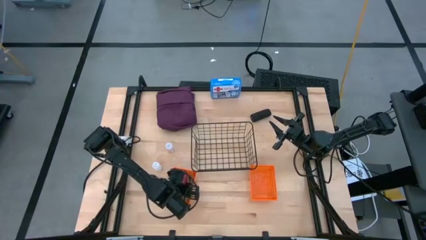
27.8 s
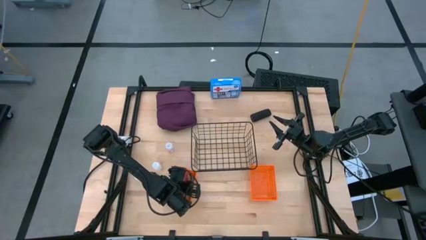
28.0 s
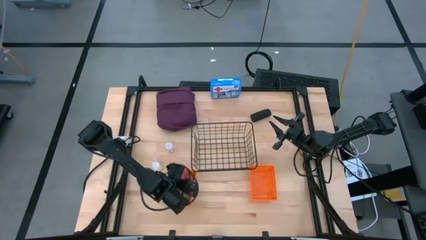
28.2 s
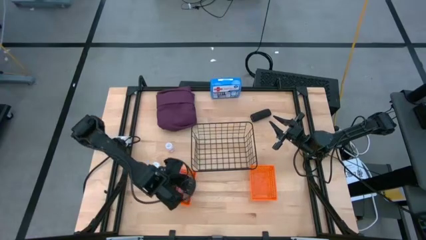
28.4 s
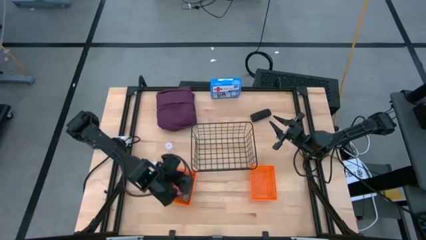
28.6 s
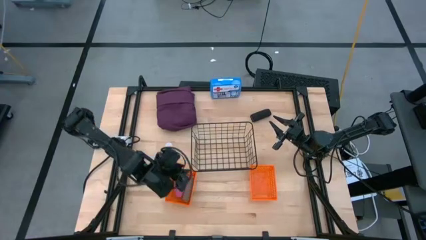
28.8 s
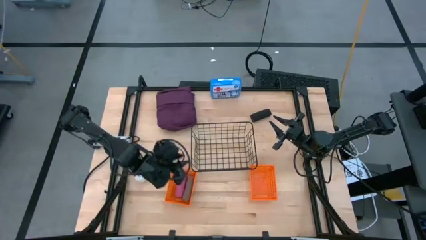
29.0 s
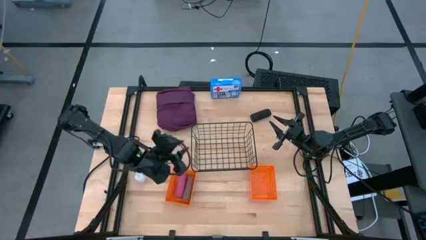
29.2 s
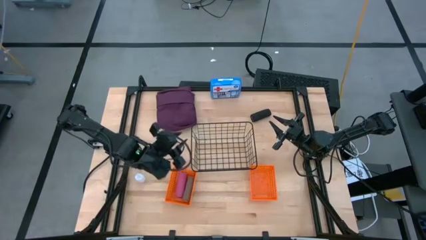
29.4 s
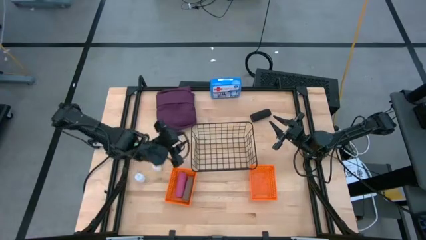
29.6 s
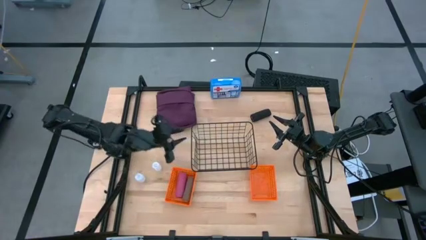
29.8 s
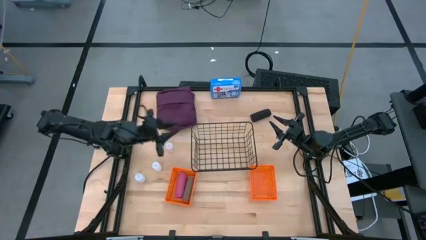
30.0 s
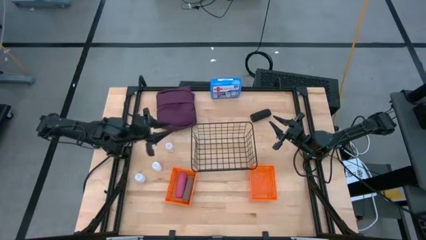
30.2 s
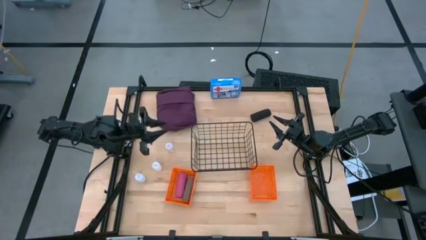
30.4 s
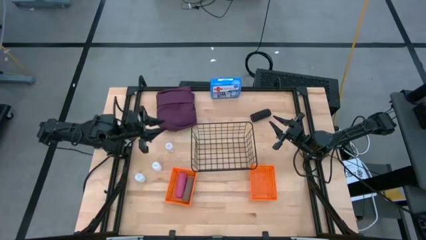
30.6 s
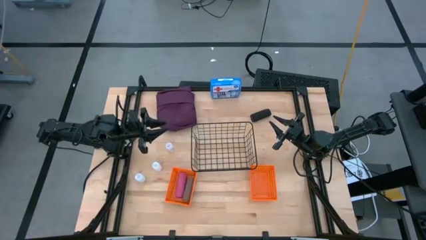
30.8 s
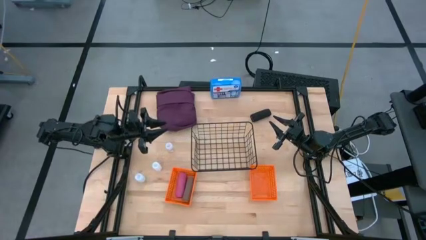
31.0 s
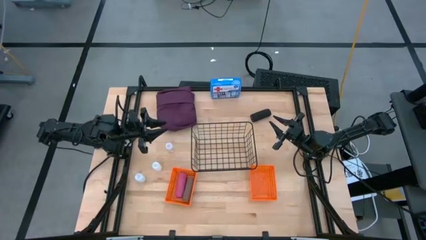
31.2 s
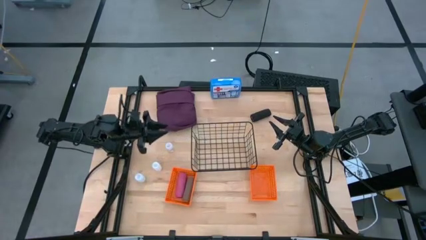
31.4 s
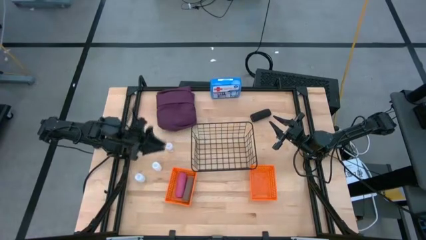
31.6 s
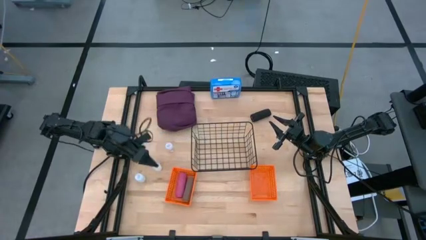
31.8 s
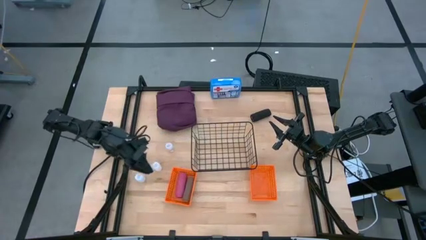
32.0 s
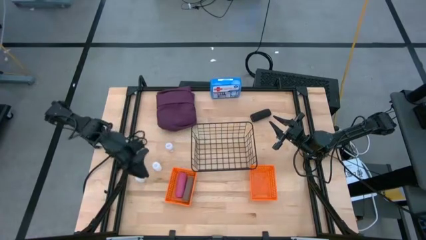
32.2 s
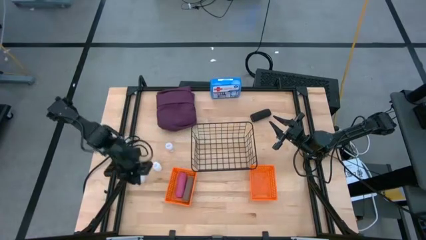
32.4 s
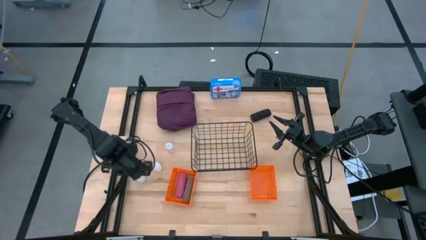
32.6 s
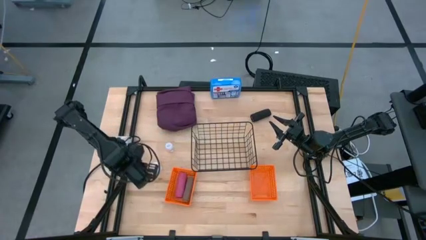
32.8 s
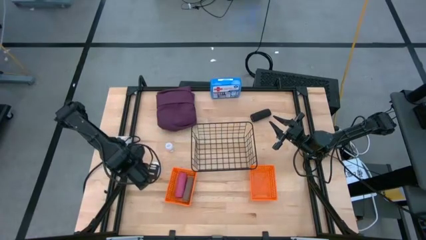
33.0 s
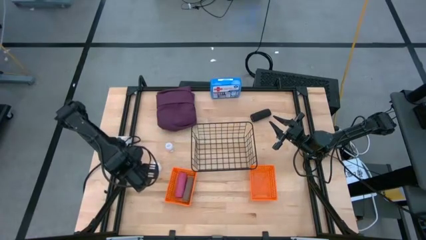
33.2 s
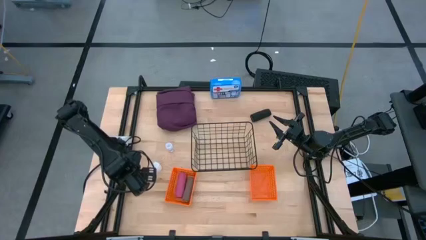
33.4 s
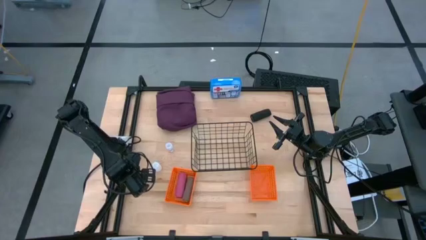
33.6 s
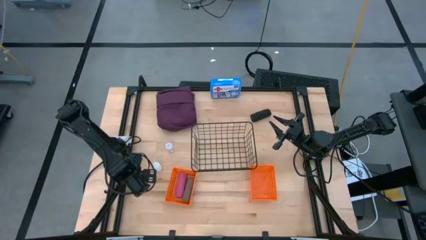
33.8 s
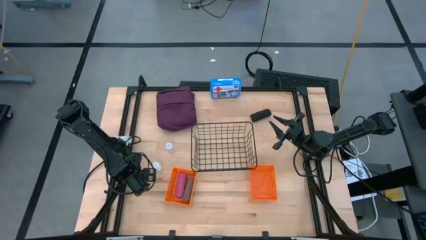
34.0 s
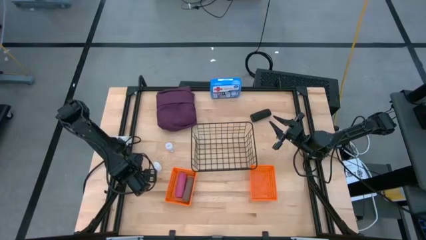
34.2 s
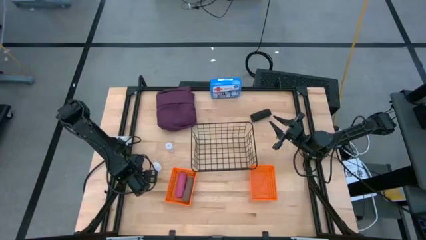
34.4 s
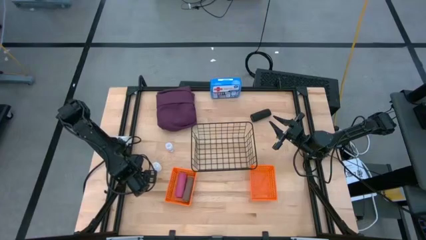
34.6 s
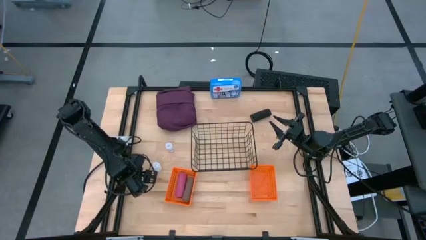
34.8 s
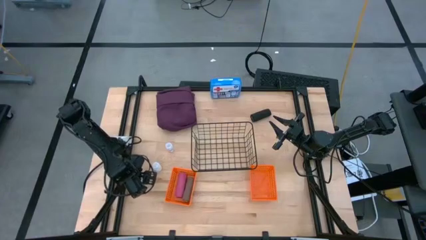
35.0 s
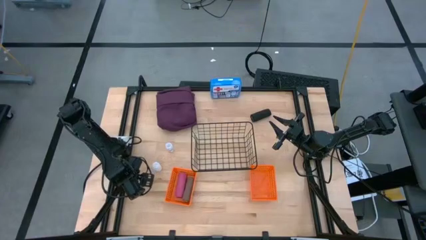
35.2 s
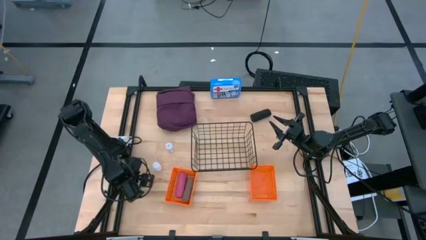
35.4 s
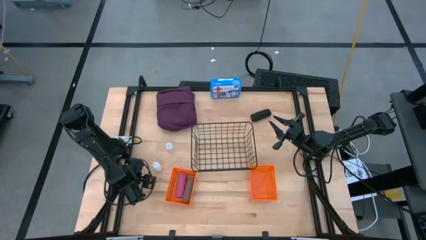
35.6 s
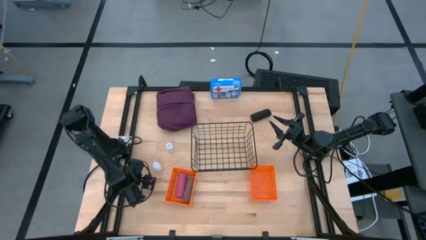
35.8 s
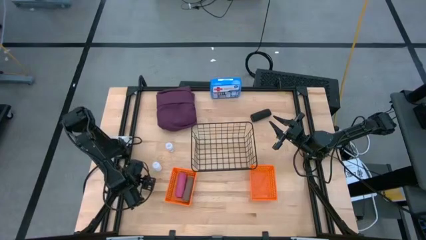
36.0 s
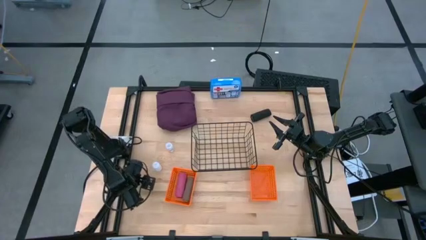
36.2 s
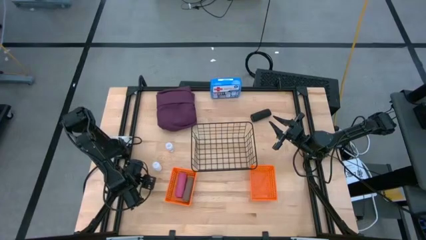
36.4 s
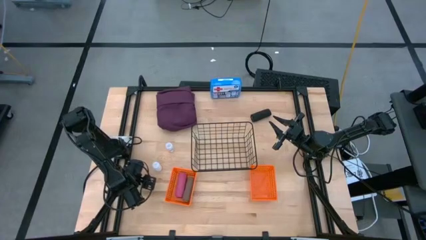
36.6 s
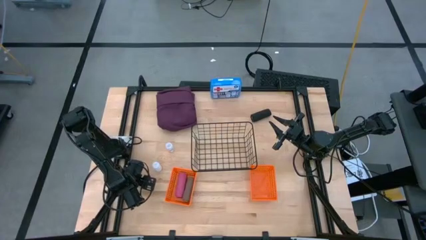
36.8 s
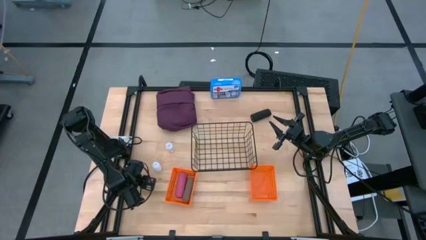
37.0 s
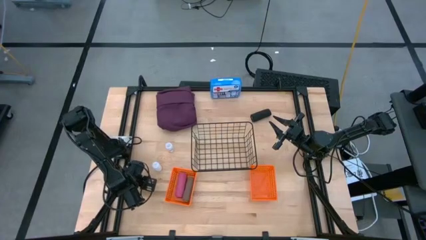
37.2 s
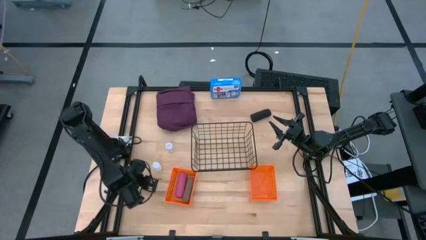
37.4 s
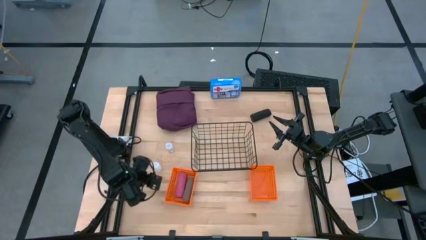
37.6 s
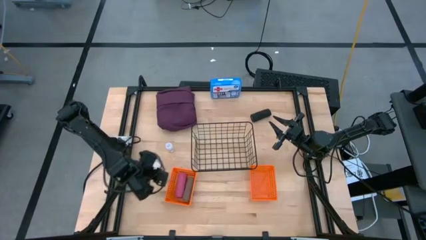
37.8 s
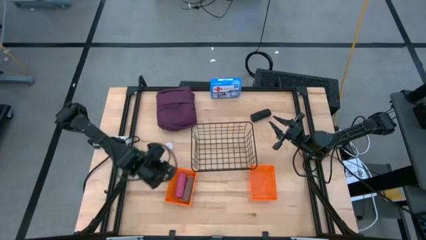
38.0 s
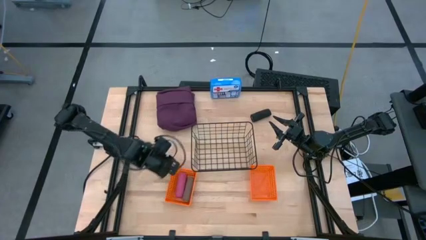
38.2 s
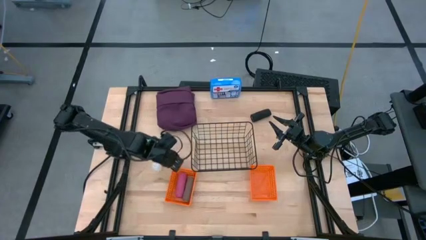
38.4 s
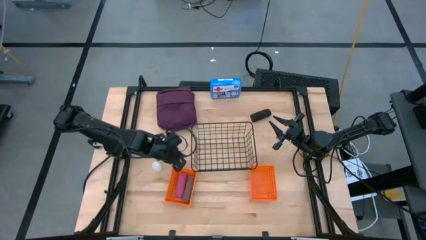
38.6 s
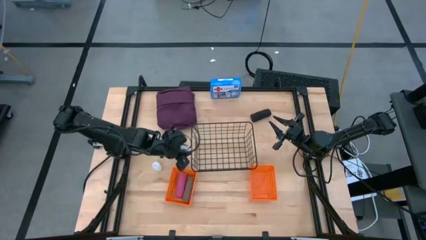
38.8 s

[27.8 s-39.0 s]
Task: Pick & Place Medicine items
Put the bottom white pill bottle into the right orange basket
